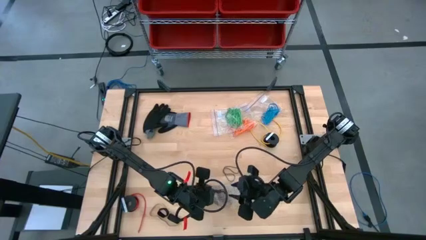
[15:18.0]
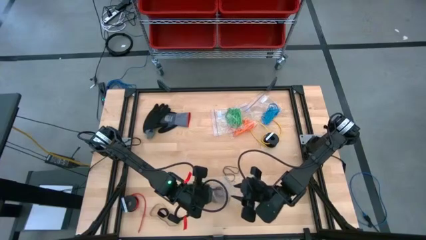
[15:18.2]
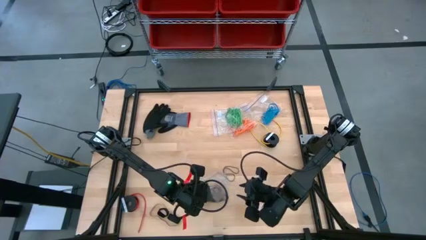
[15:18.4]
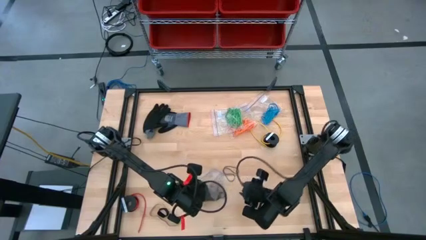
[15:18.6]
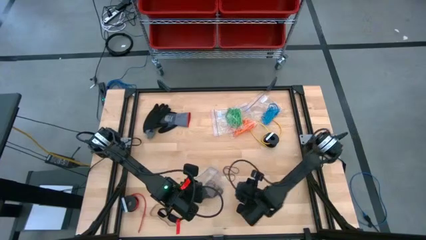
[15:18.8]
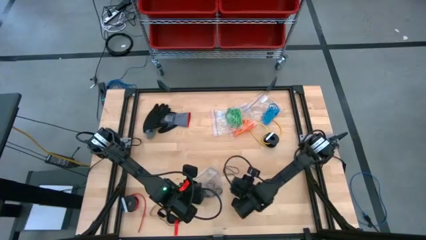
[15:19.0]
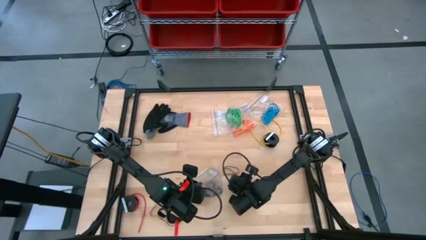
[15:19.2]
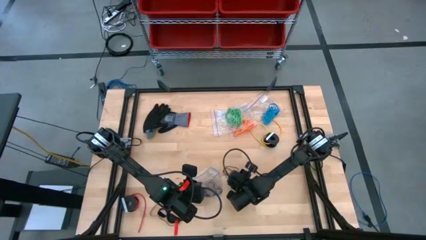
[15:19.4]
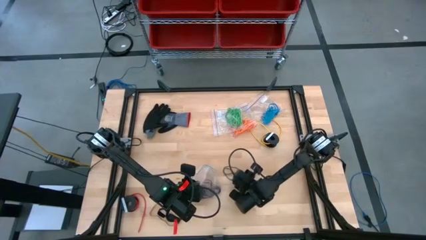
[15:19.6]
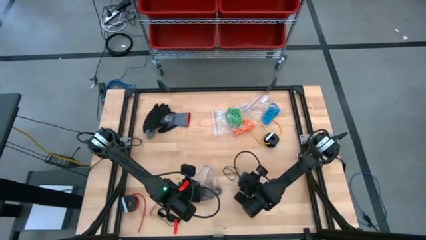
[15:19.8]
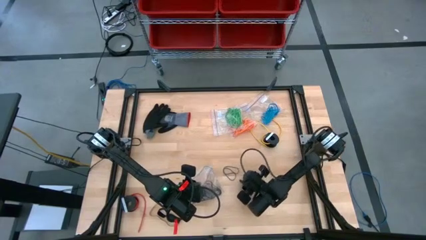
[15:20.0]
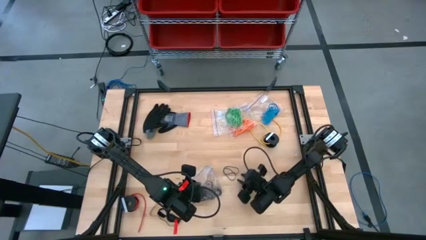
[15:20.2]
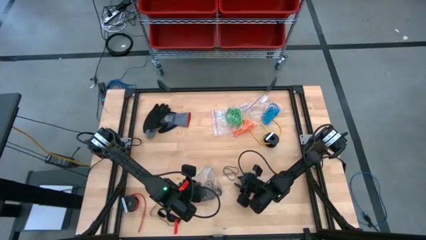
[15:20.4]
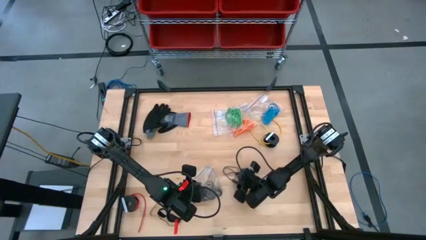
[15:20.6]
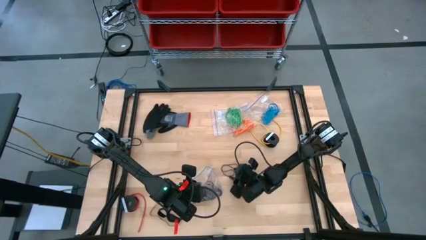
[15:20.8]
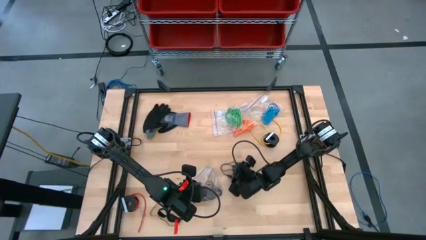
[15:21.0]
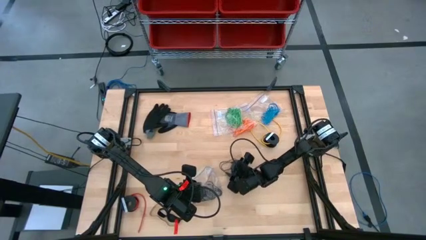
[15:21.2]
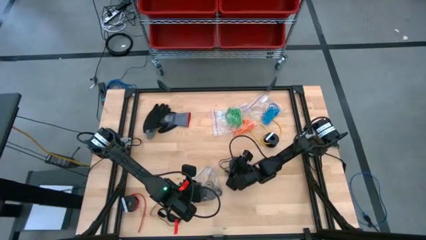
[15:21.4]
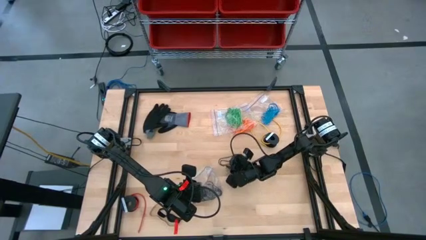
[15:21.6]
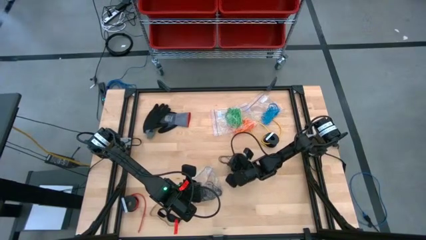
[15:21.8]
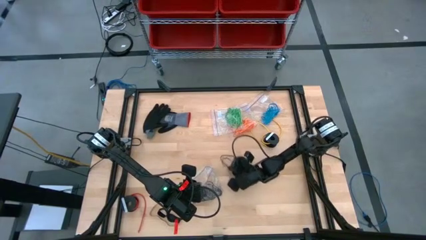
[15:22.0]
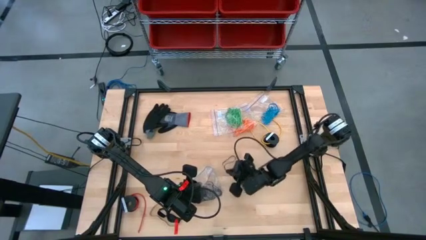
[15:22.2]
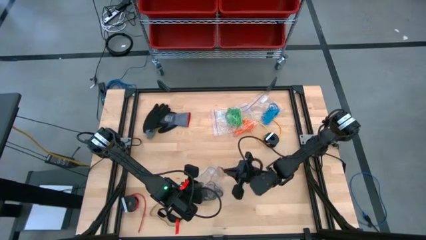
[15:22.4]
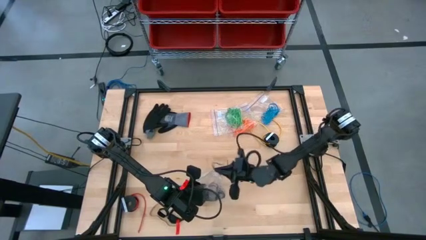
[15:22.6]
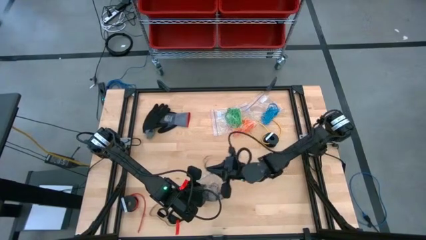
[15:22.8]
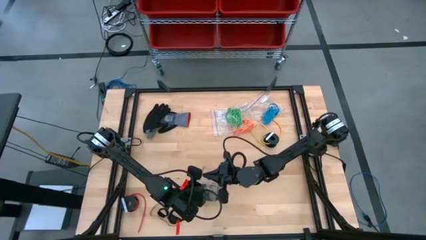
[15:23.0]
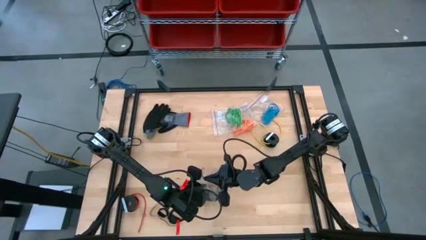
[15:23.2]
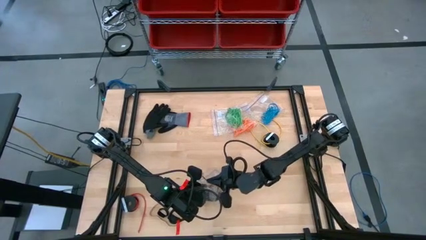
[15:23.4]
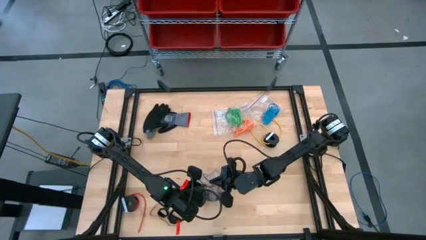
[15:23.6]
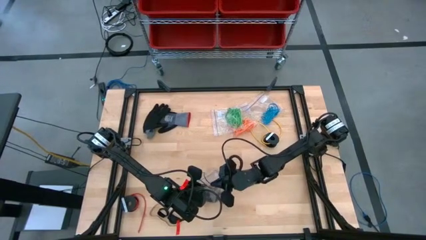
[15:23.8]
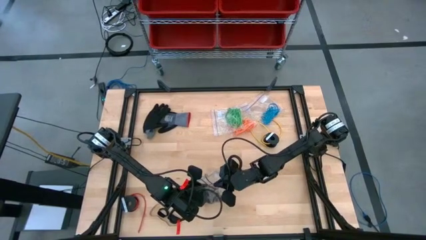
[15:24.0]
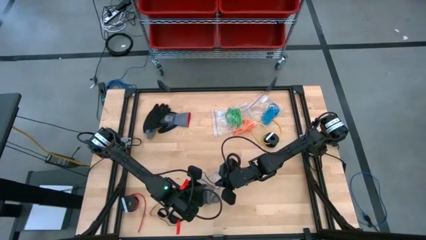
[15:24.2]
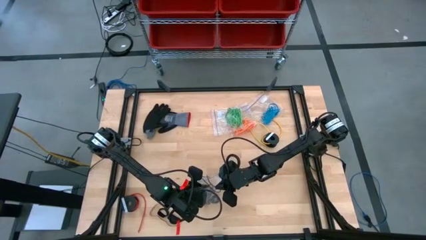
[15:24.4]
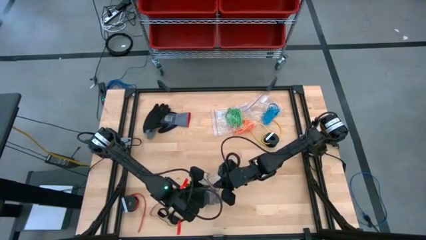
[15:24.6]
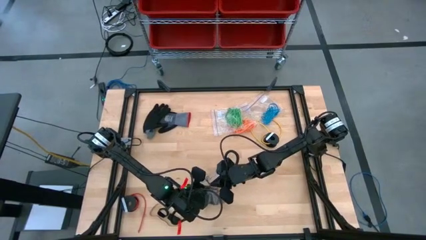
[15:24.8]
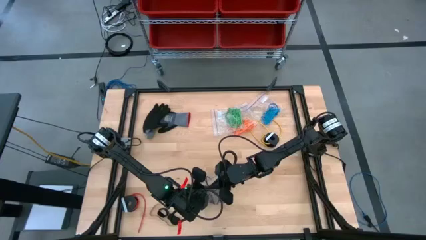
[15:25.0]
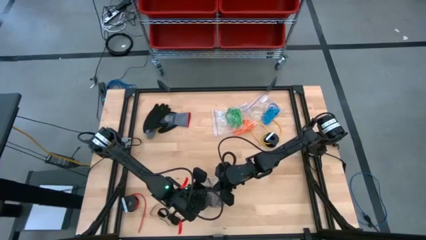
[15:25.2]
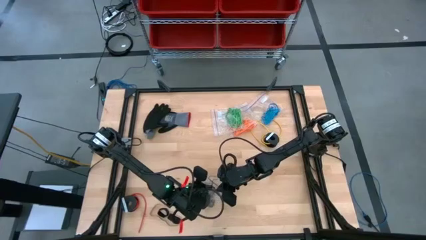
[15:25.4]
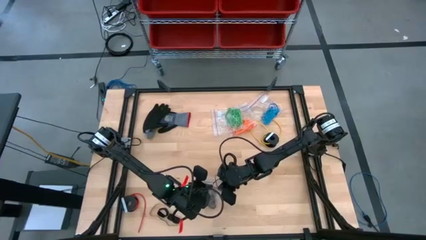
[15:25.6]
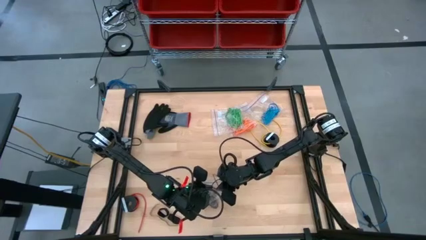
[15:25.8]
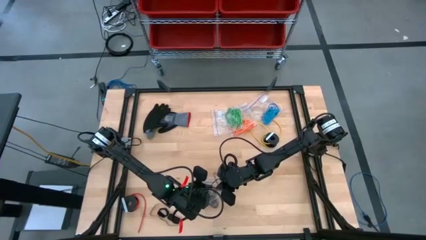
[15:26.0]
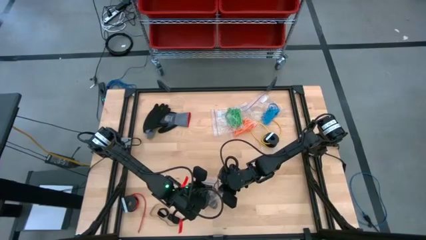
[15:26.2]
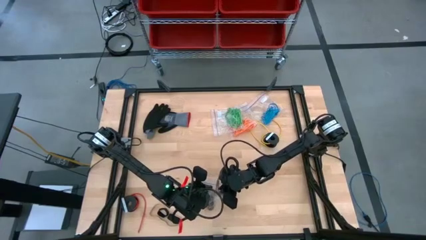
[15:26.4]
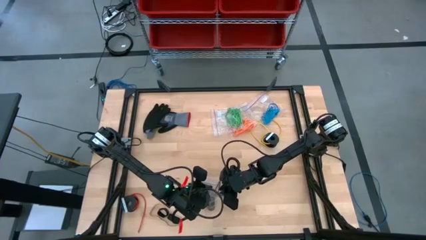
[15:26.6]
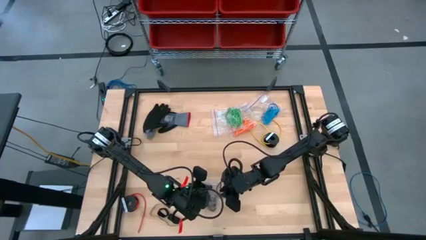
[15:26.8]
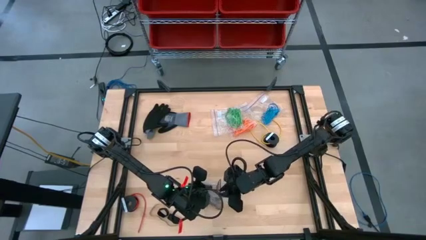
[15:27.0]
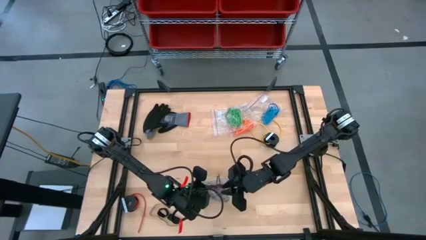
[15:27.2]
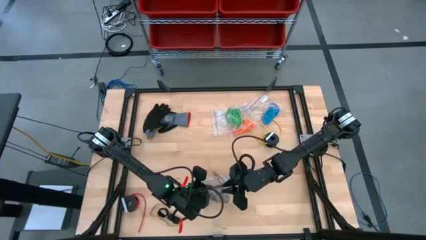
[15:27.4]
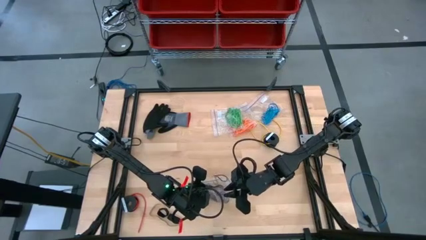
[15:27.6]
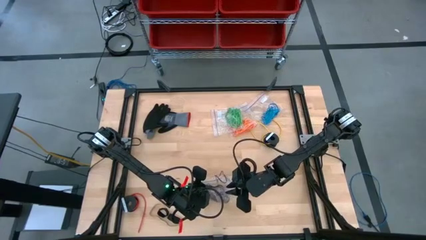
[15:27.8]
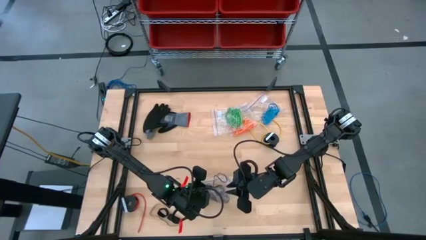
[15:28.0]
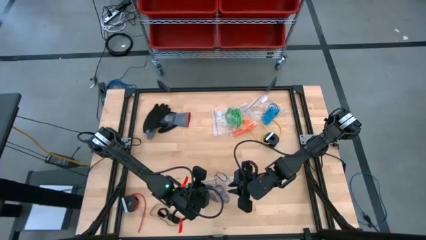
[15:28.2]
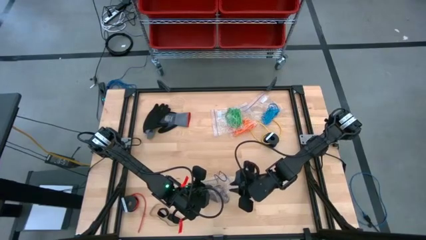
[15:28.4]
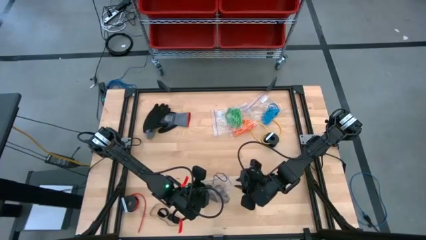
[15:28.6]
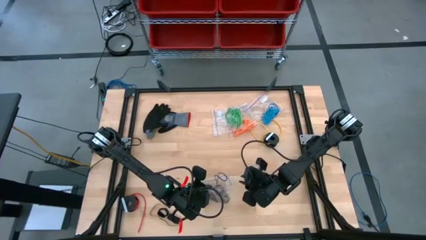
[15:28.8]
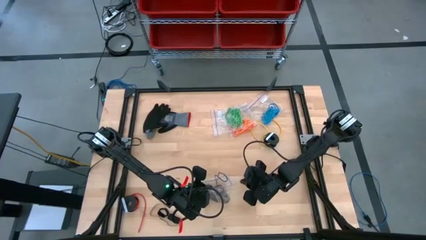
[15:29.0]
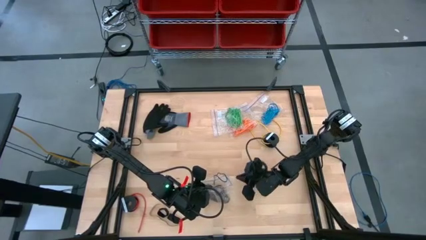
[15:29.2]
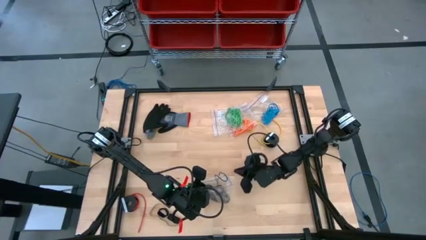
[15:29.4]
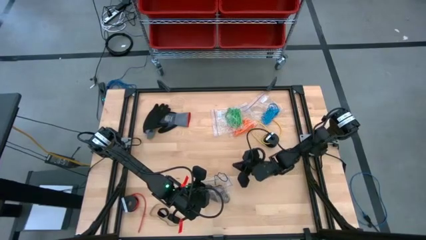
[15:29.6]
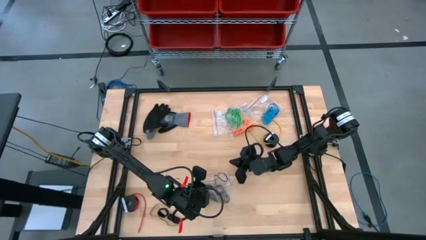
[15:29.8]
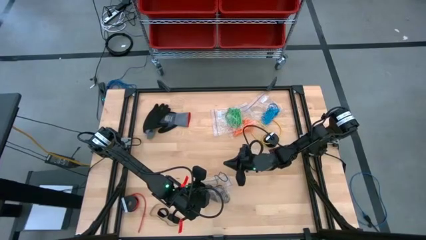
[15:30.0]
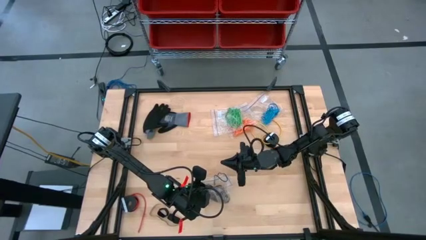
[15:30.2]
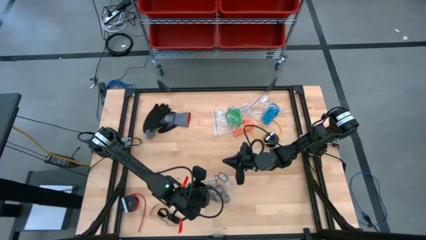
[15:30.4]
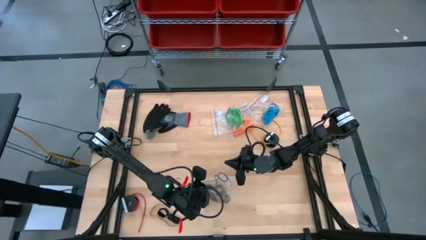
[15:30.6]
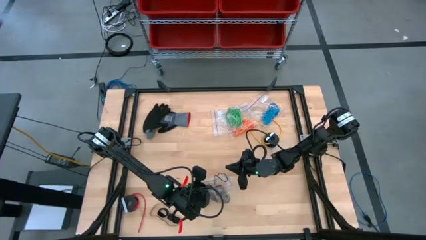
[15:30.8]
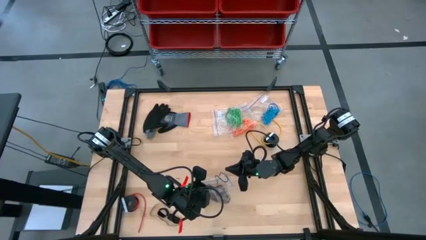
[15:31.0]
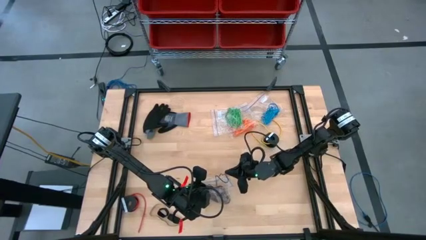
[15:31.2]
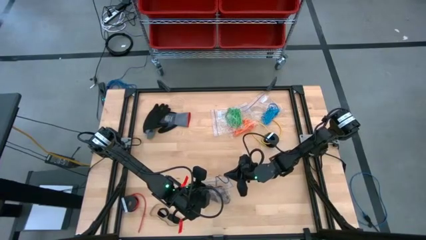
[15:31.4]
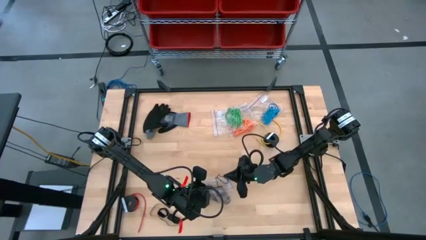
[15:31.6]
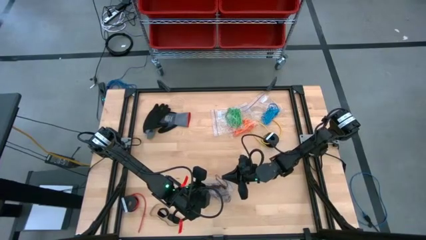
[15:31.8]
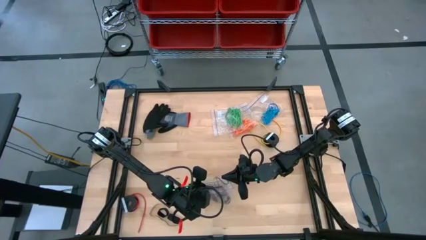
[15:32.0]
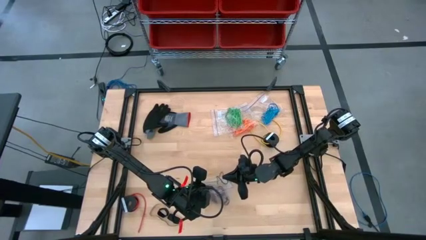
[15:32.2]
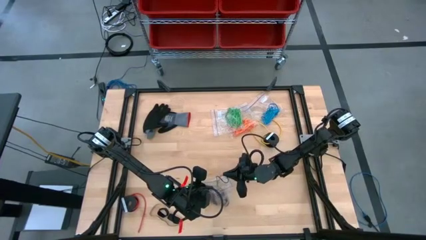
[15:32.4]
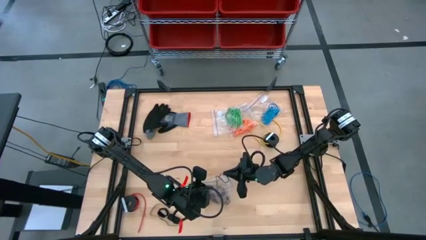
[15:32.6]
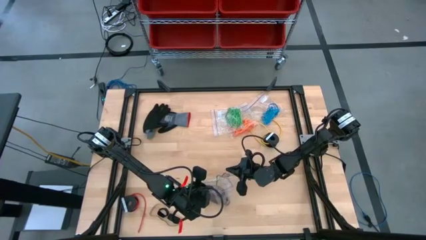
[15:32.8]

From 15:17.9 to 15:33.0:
Task: Sort rubber bands
Put the black rubber band into the transparent zip bag
